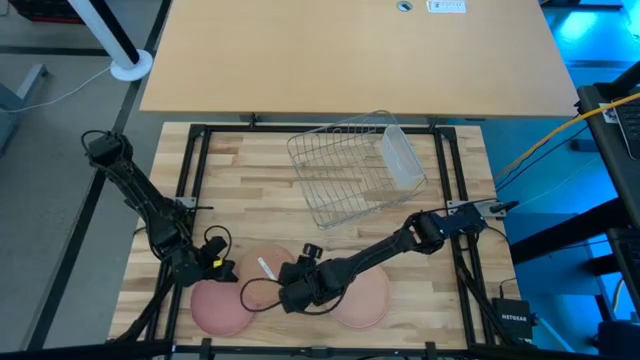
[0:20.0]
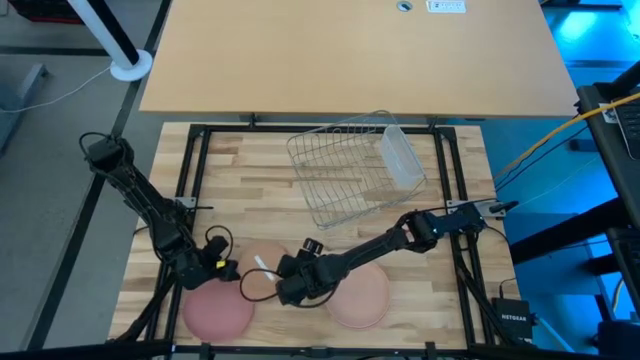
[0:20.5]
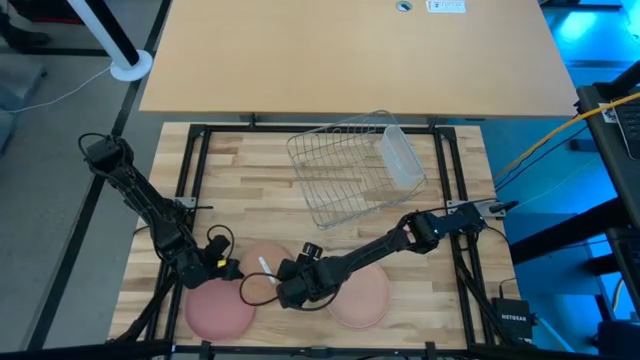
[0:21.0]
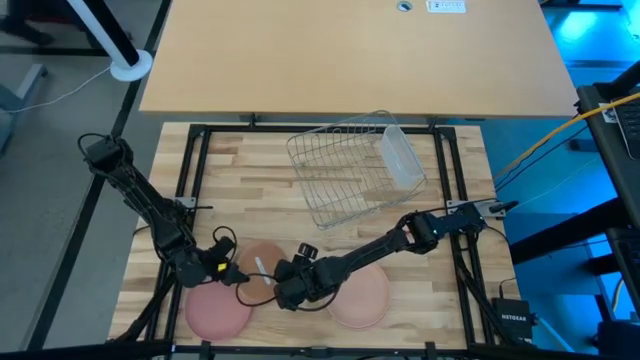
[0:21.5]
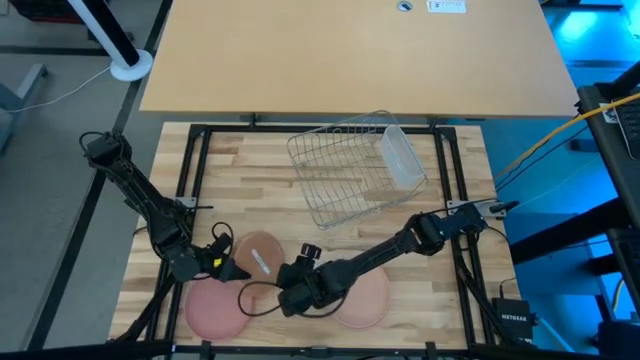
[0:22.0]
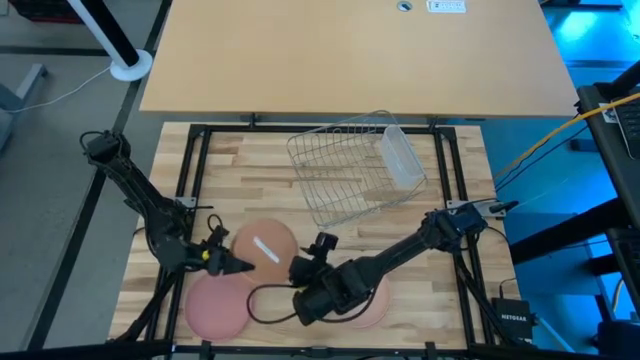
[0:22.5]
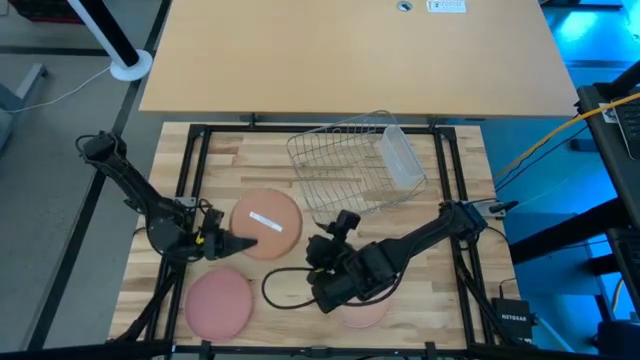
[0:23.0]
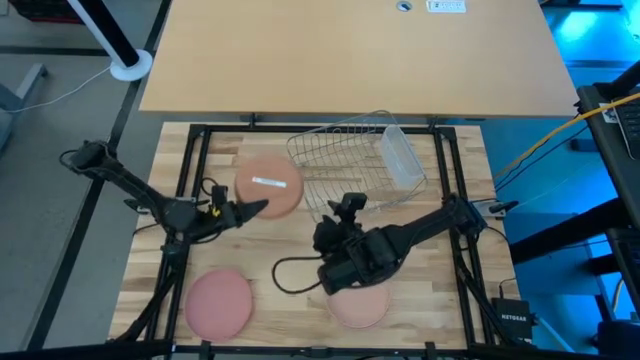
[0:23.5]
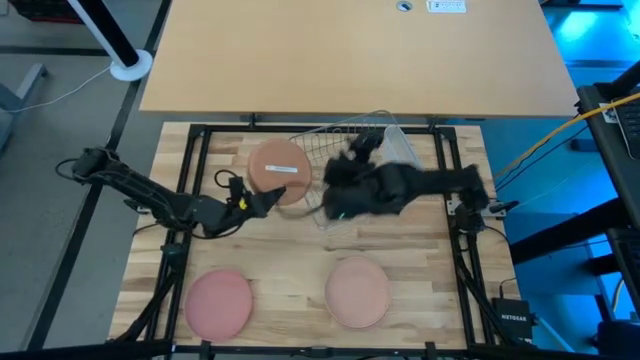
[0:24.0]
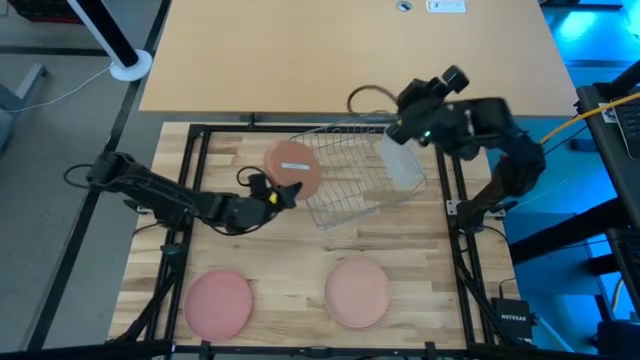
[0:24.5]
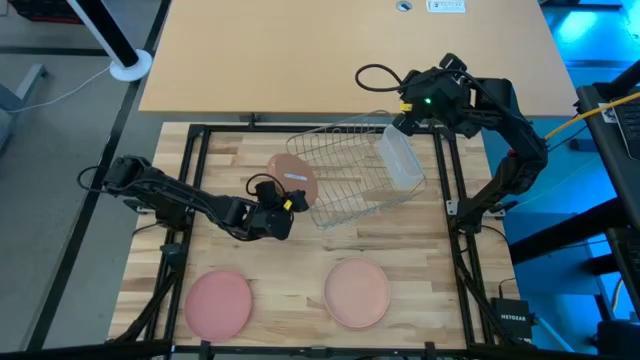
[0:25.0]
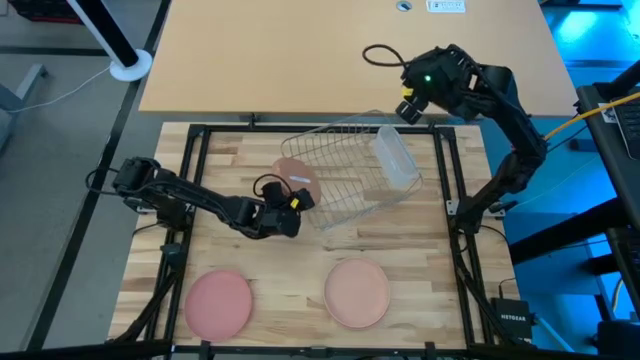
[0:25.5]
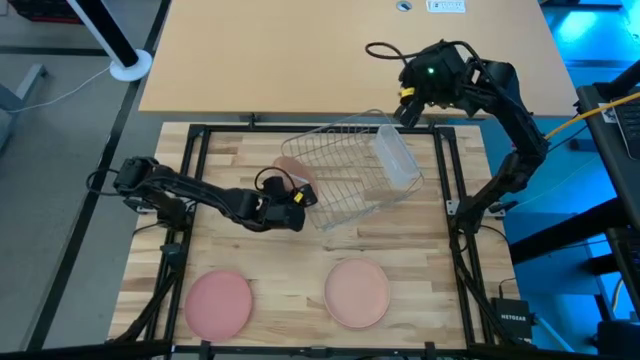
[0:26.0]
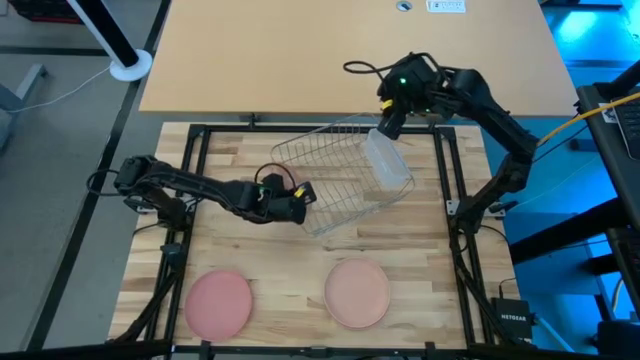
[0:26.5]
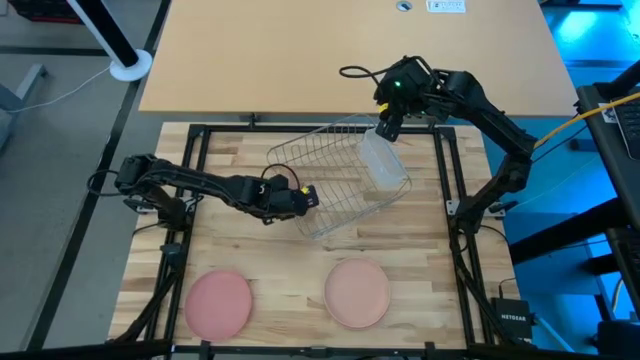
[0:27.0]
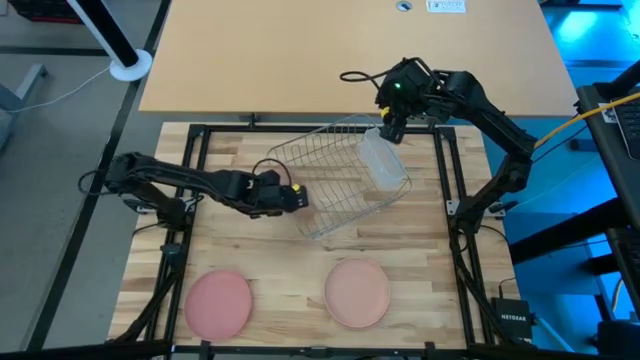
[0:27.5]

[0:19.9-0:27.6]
Task: Sort dishes
Put the brown plate into the dish rack

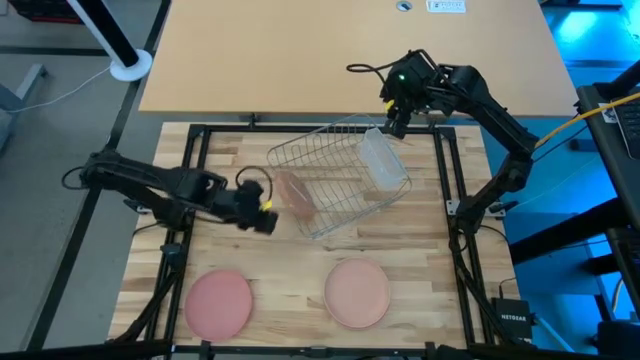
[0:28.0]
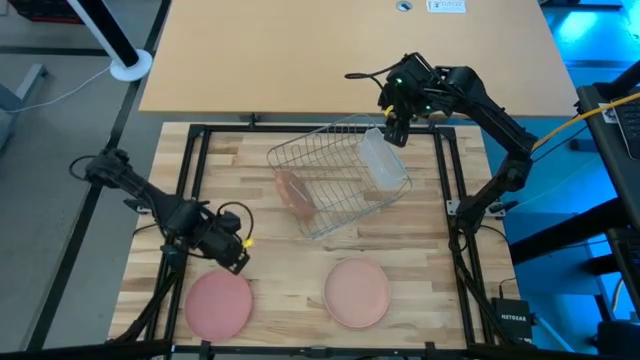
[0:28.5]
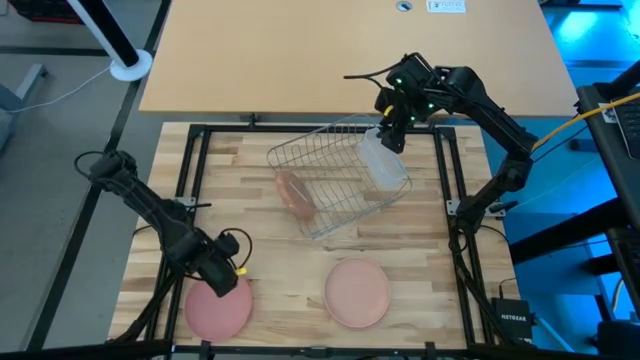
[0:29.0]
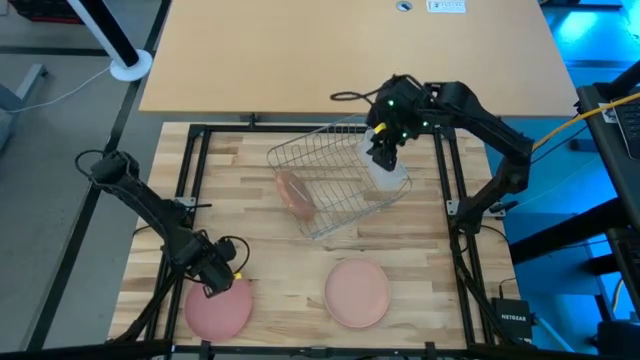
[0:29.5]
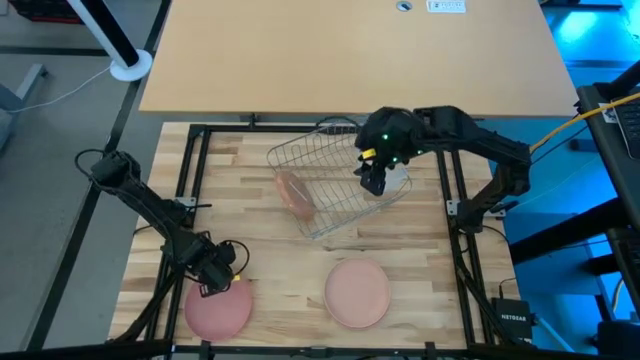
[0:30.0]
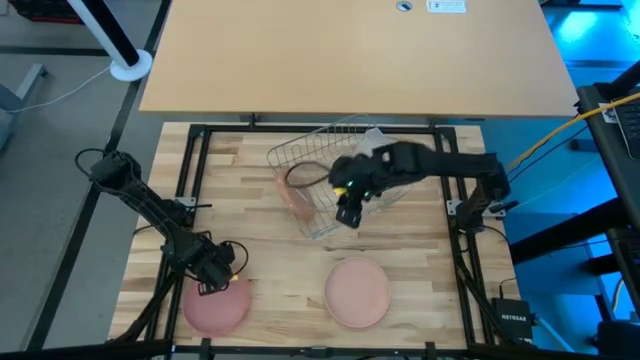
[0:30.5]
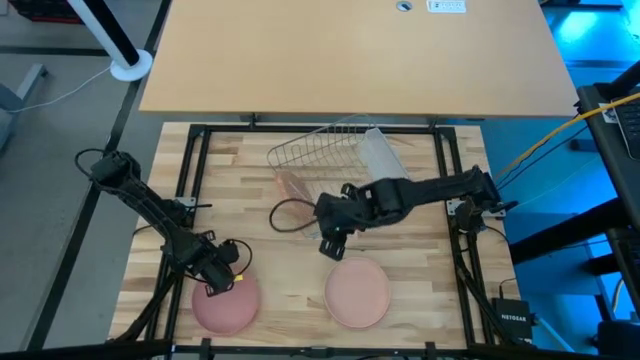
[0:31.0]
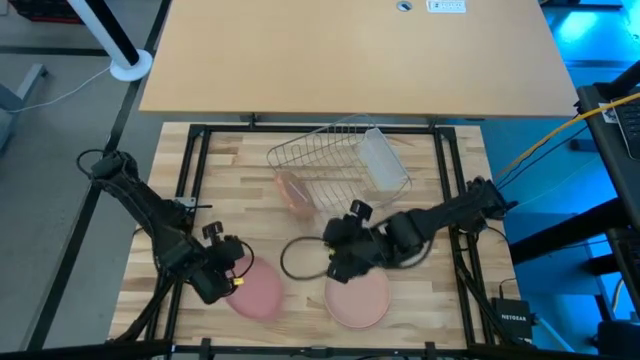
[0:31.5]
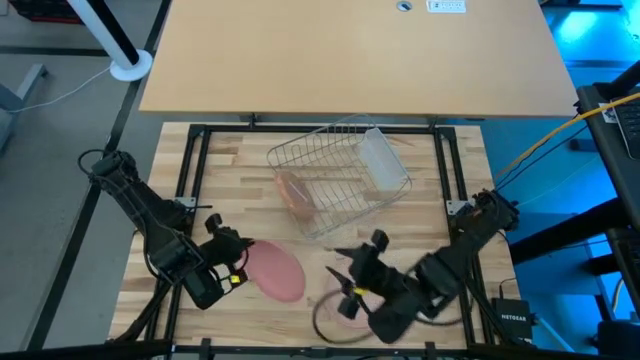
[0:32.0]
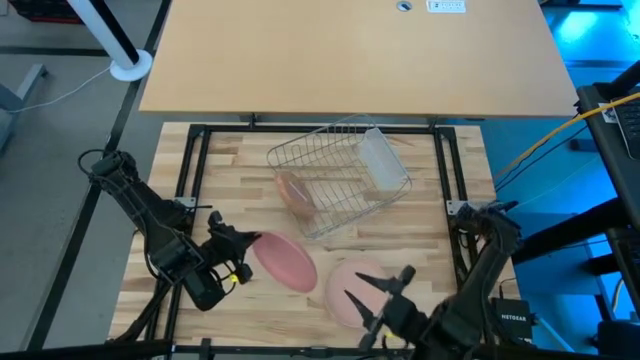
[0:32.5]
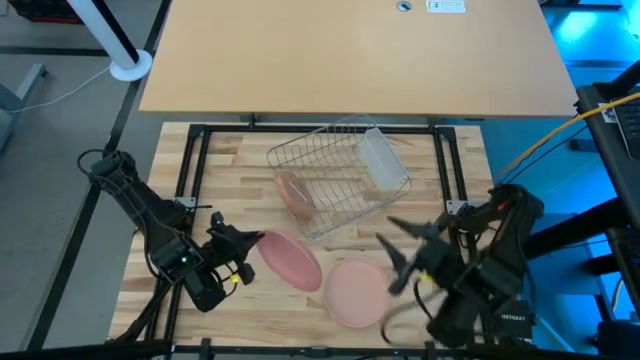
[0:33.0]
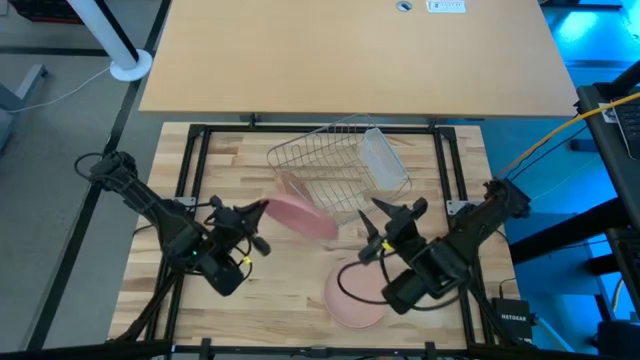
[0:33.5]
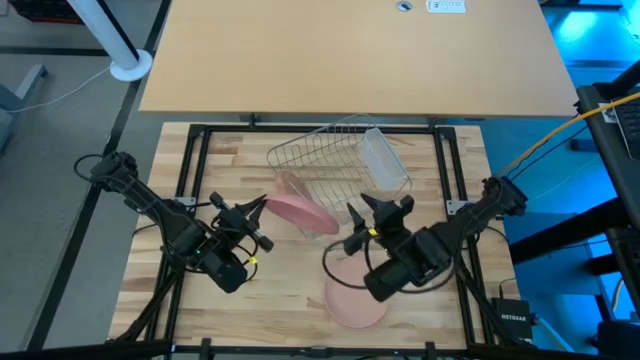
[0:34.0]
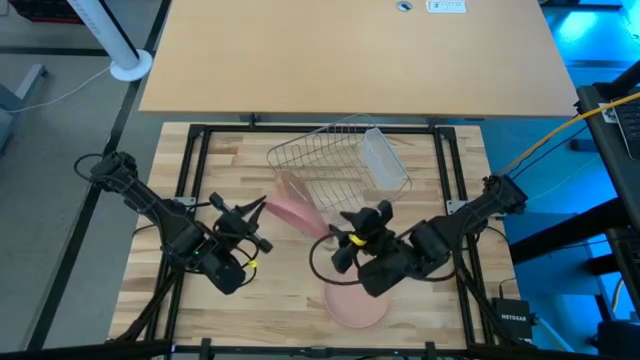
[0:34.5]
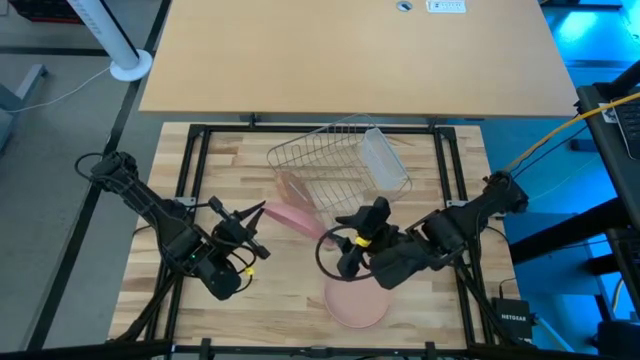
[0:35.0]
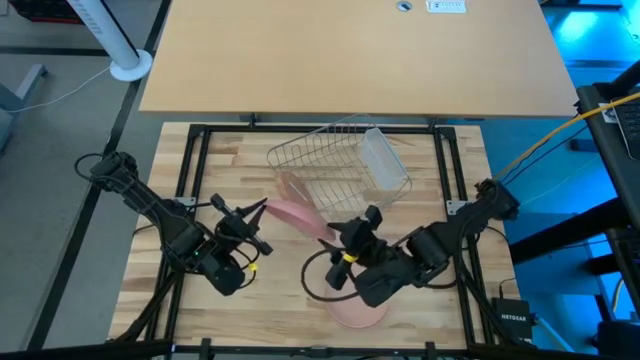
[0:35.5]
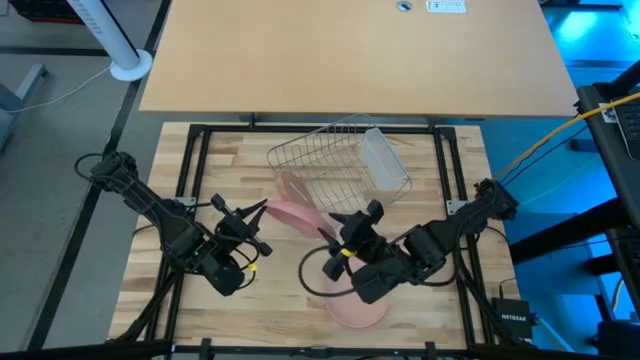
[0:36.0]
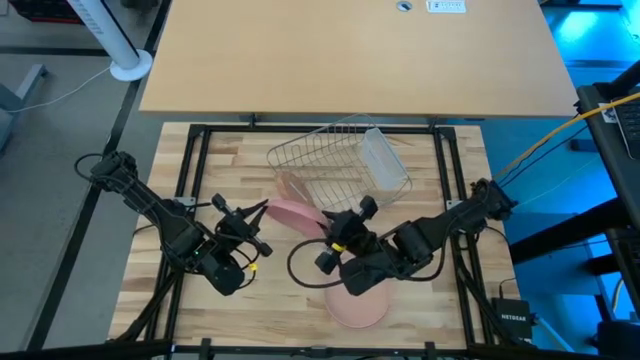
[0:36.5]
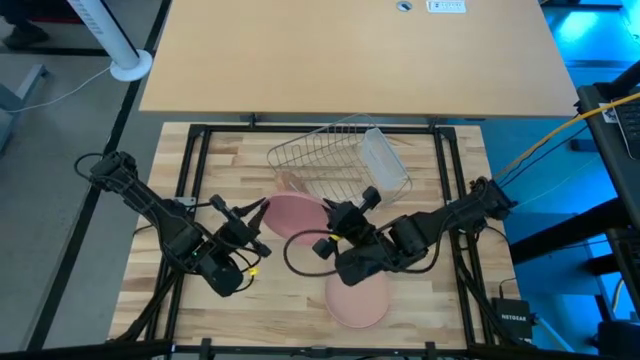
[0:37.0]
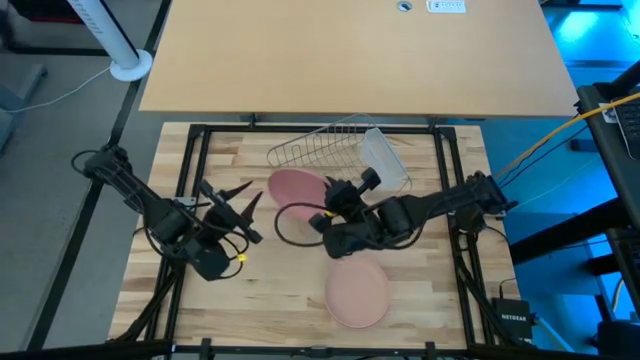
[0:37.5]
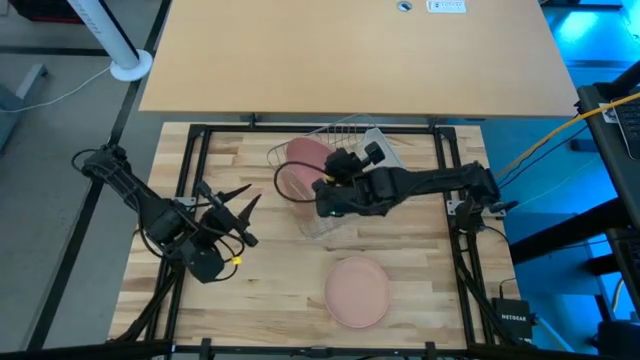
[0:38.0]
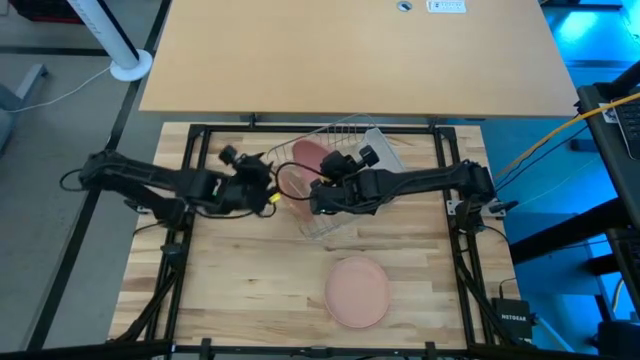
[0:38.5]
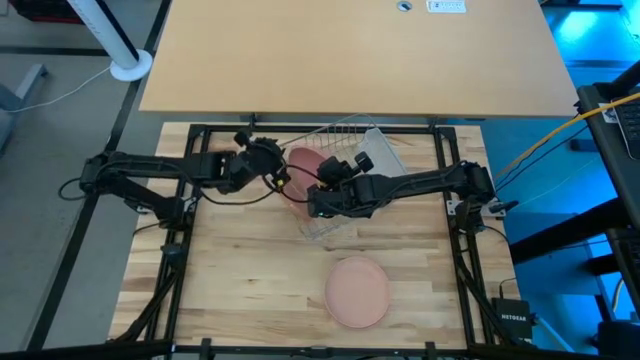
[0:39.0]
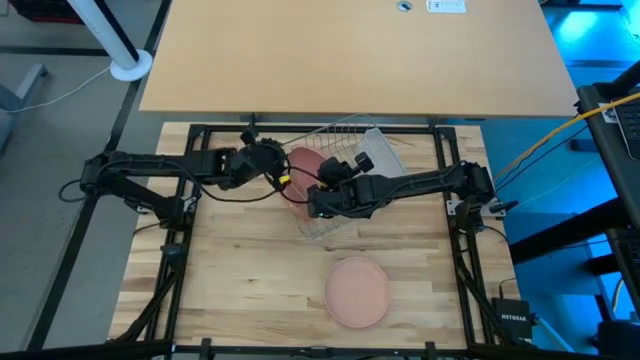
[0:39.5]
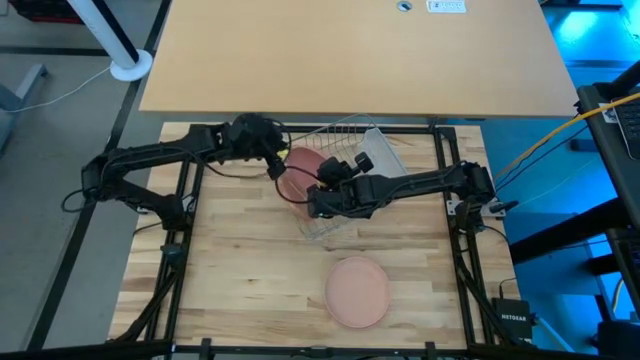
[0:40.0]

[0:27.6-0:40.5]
Put the light pink plate into the dish rack
